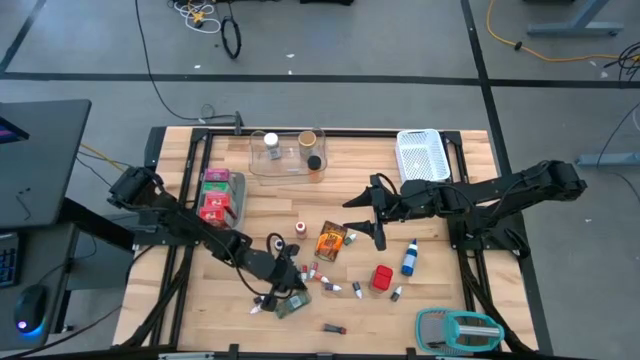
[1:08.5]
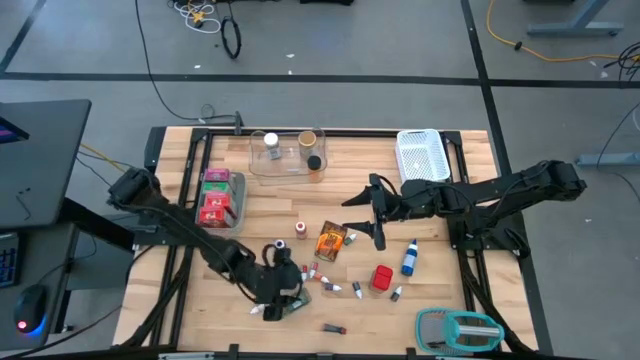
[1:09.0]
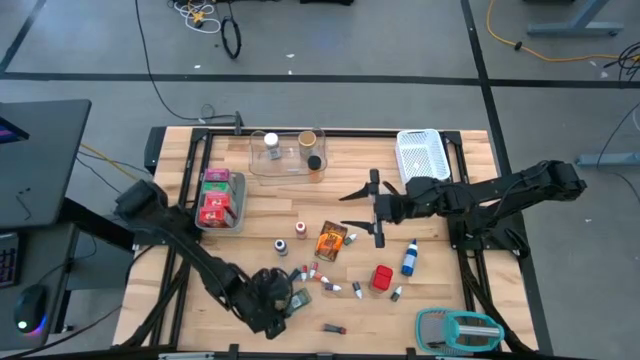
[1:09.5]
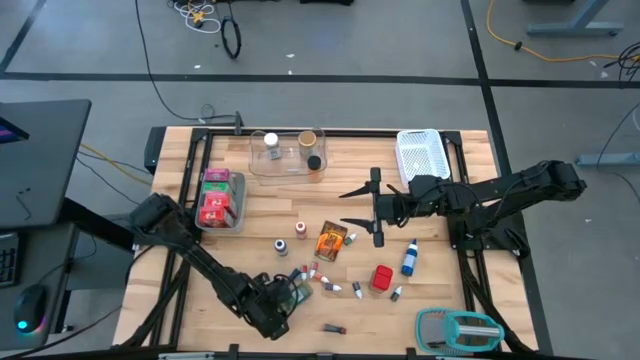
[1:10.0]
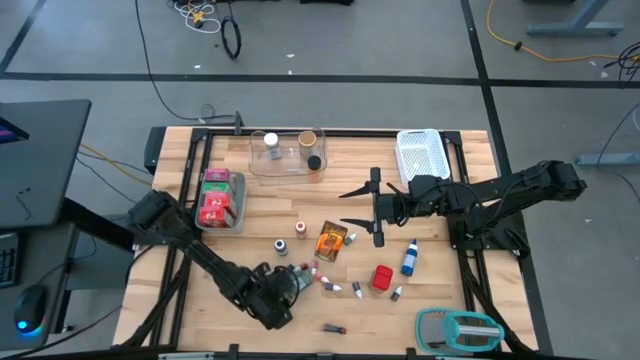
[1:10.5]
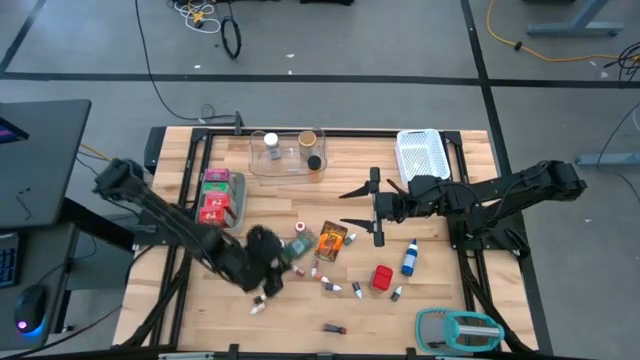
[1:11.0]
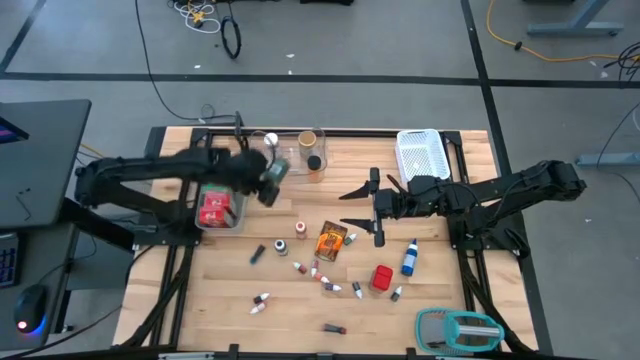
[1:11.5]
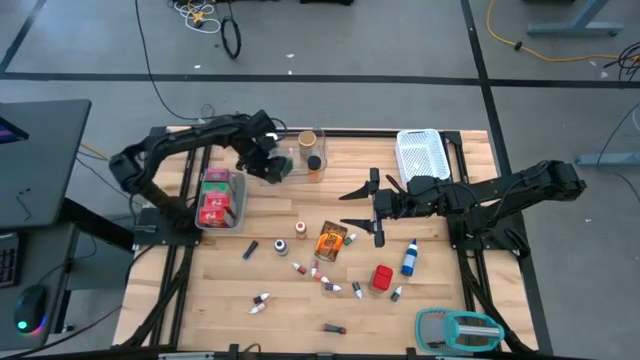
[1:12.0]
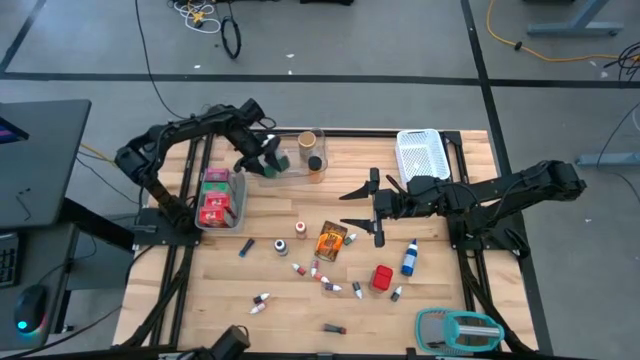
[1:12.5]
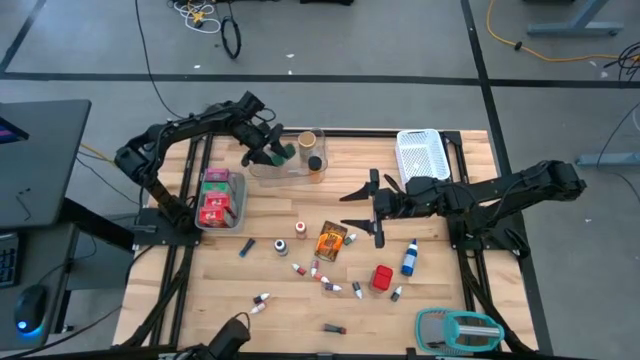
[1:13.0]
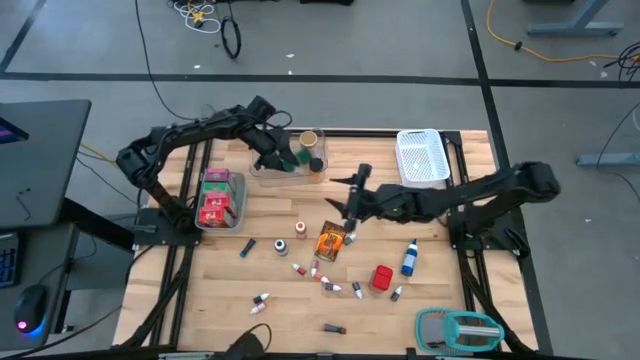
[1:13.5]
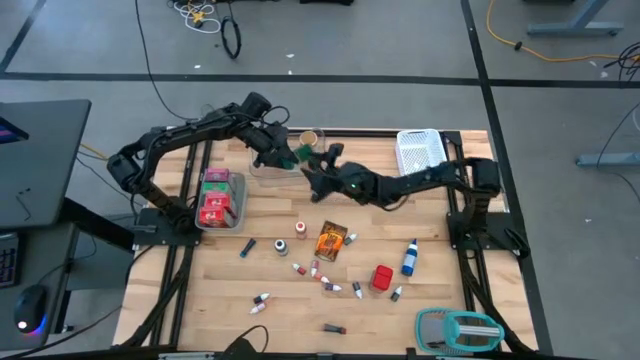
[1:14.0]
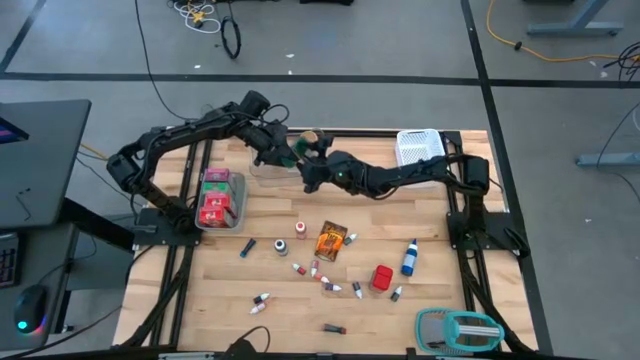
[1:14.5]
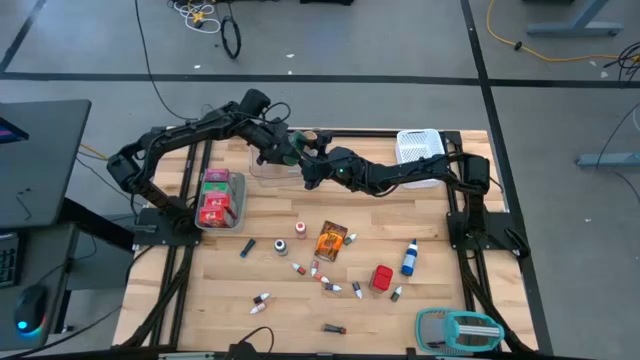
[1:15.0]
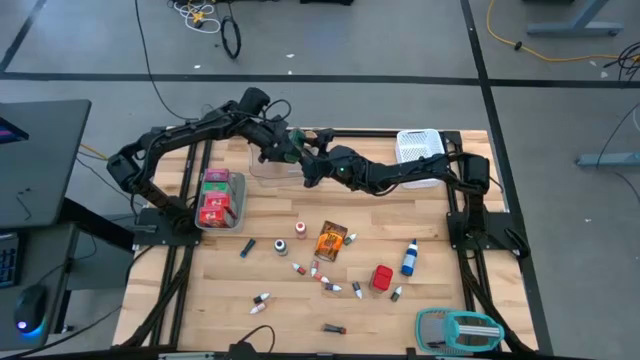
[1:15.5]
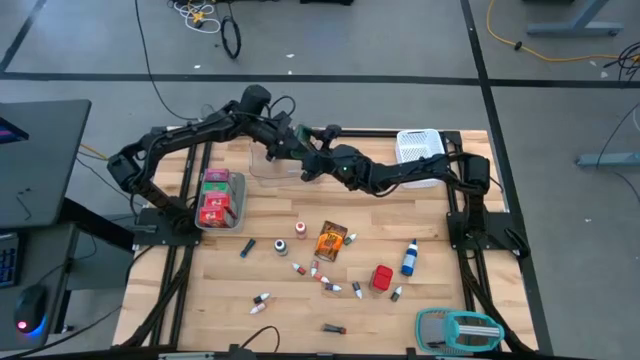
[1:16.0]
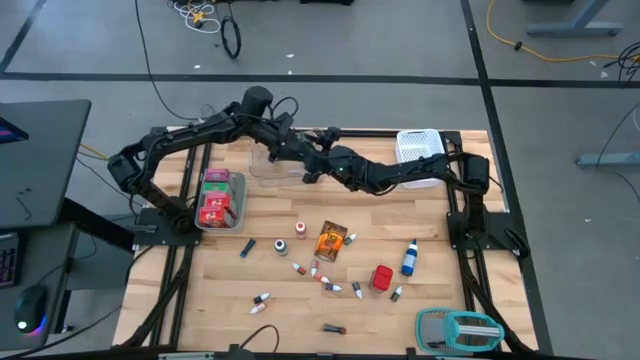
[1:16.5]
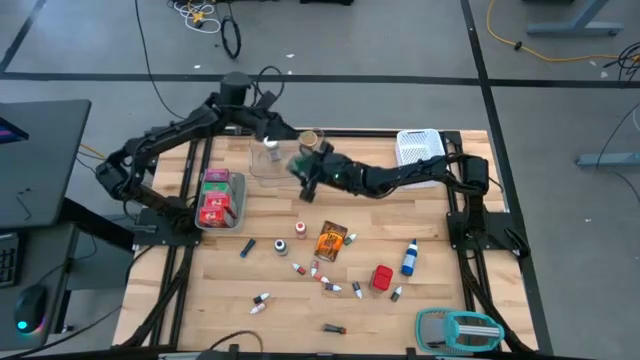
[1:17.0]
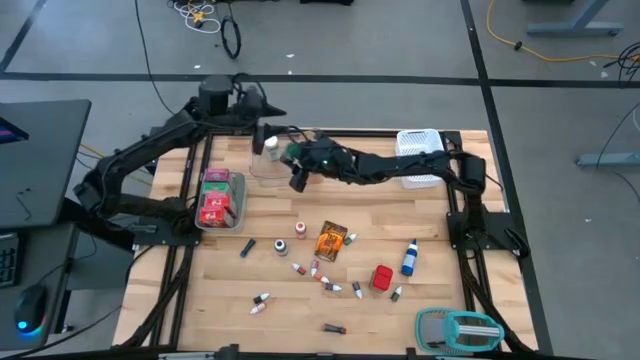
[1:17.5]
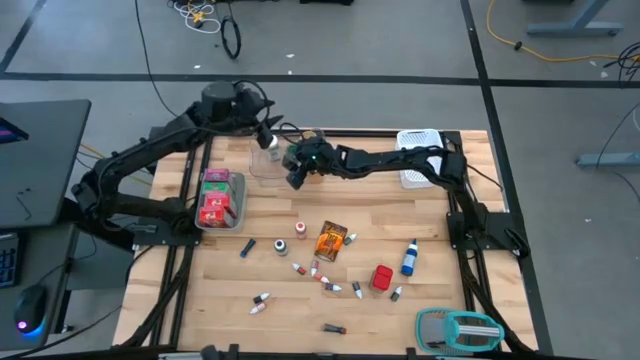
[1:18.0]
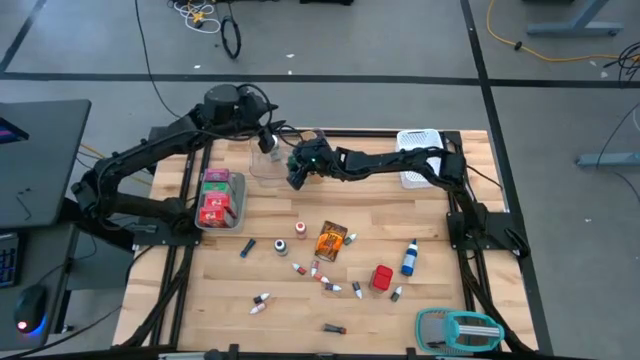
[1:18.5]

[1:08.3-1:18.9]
Task: Pick & Place Kitchen Items
Put the green seasoning bottle into the transparent bin

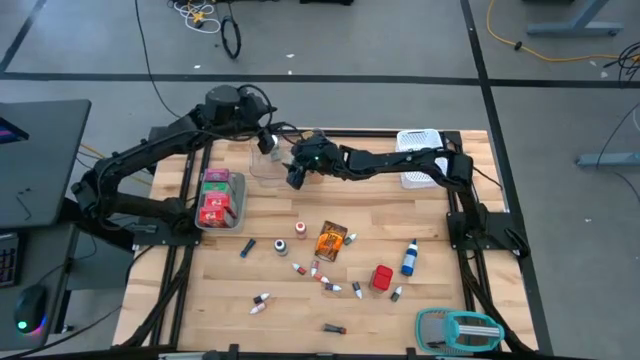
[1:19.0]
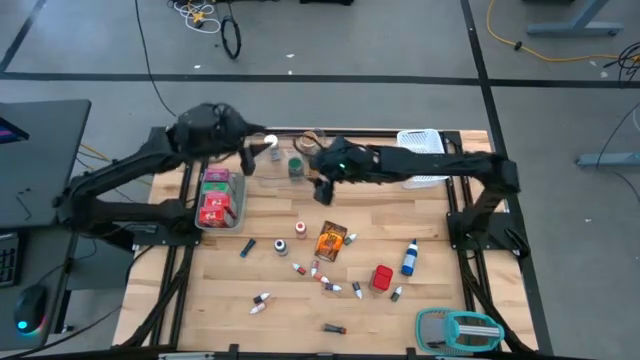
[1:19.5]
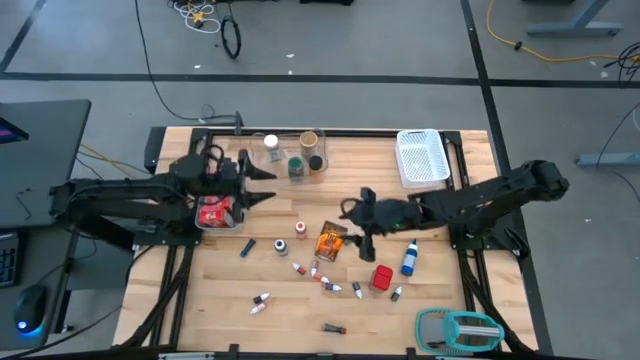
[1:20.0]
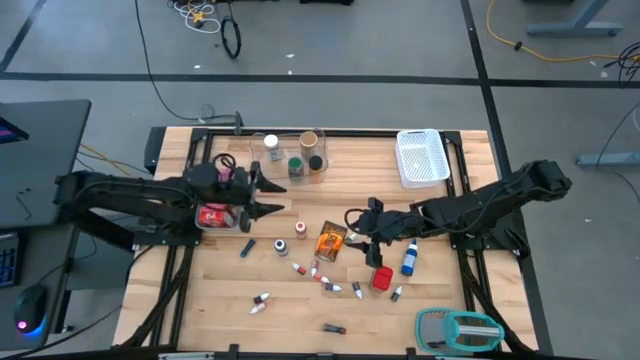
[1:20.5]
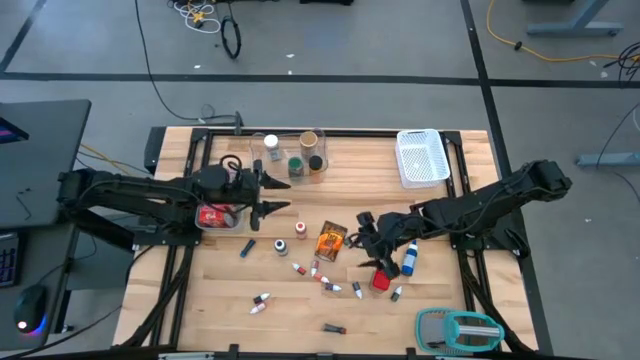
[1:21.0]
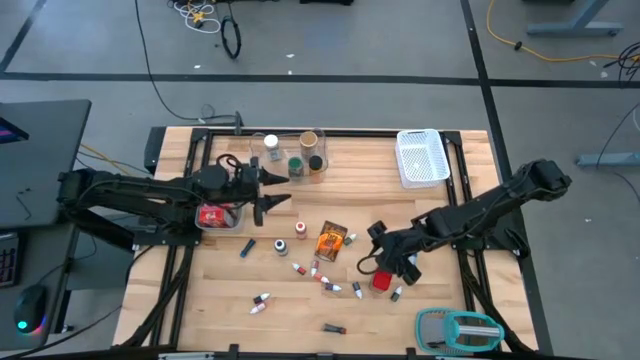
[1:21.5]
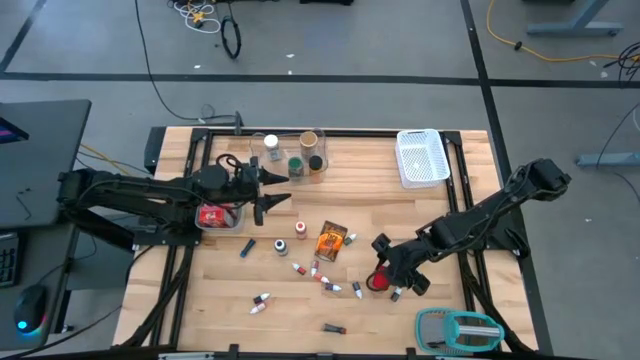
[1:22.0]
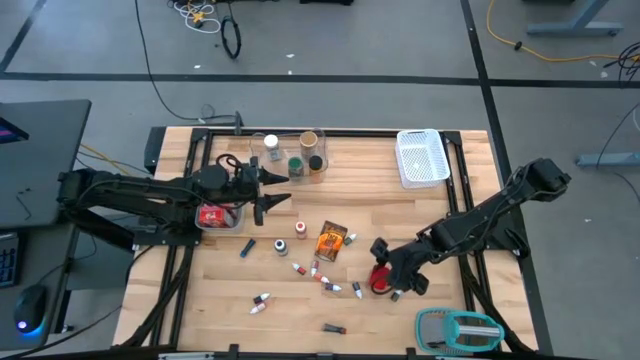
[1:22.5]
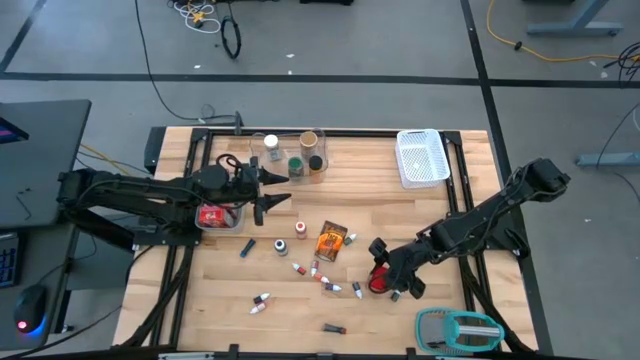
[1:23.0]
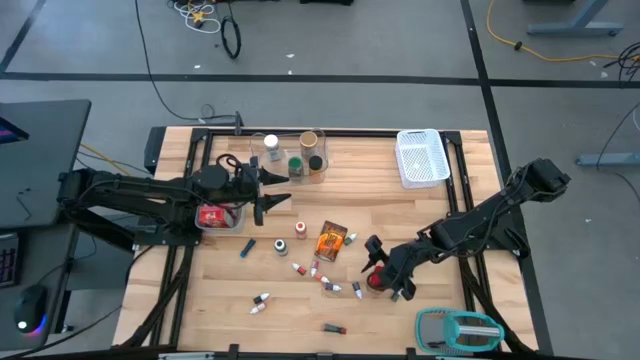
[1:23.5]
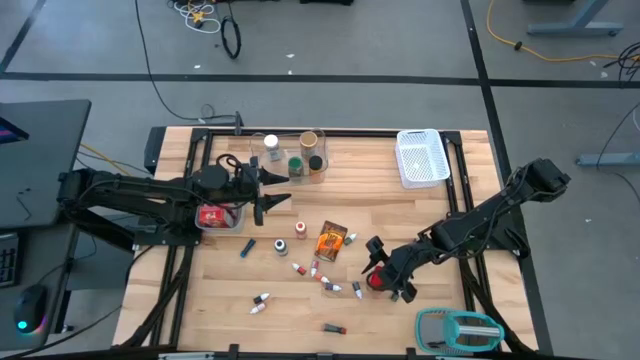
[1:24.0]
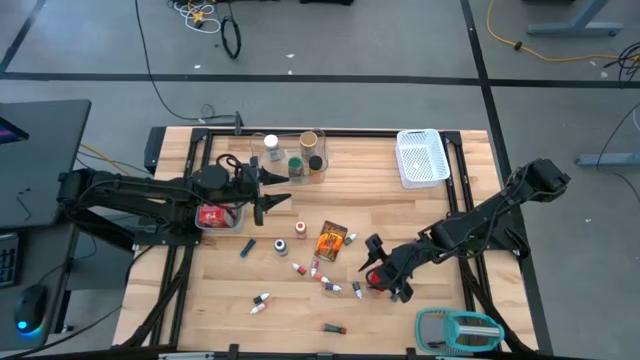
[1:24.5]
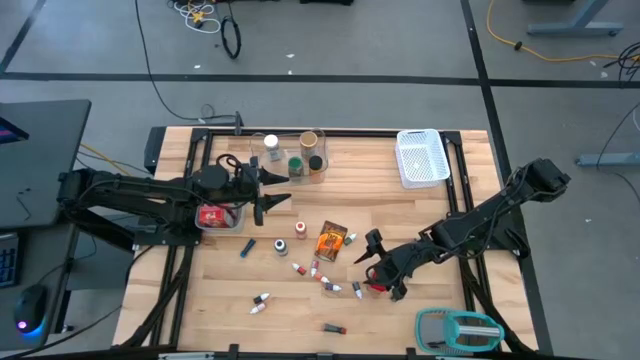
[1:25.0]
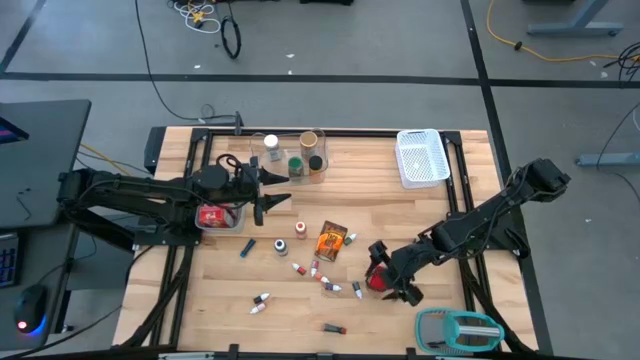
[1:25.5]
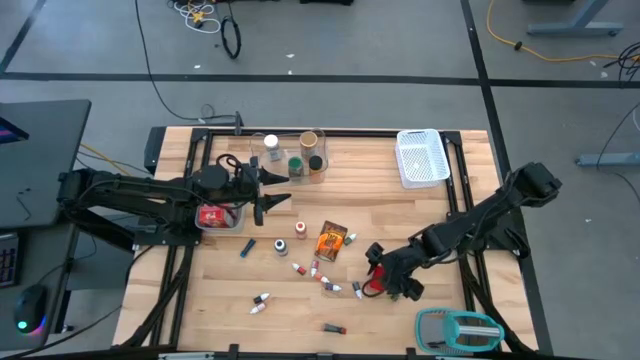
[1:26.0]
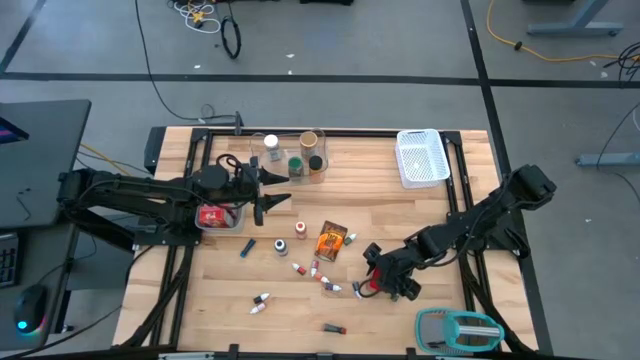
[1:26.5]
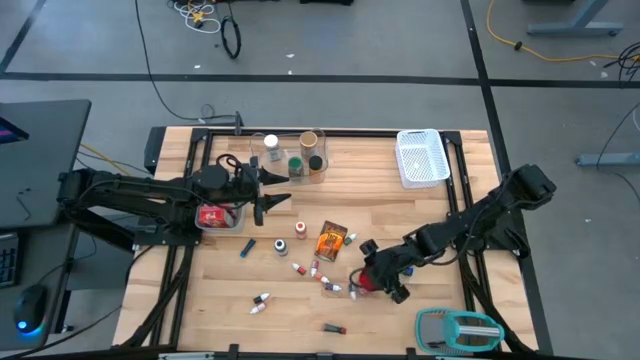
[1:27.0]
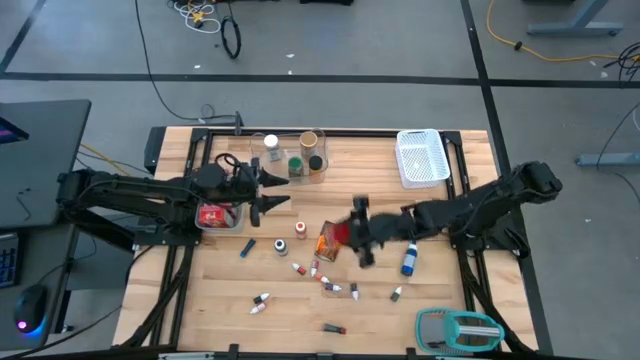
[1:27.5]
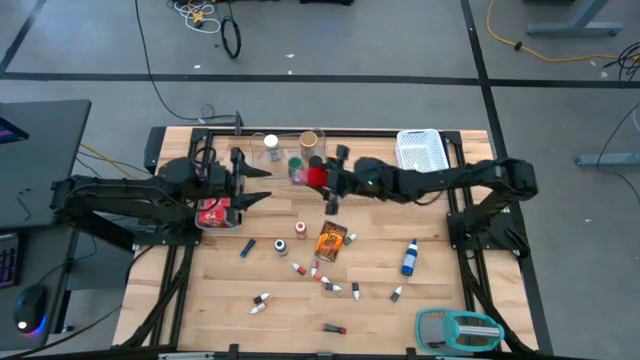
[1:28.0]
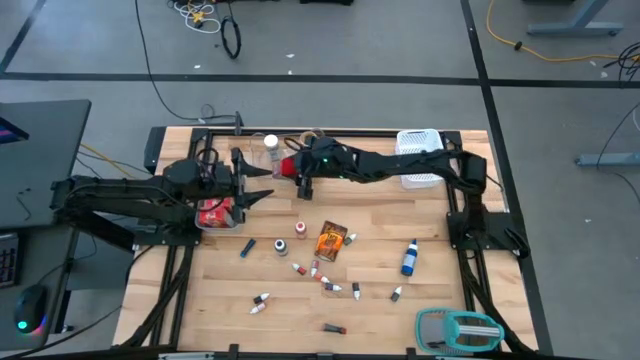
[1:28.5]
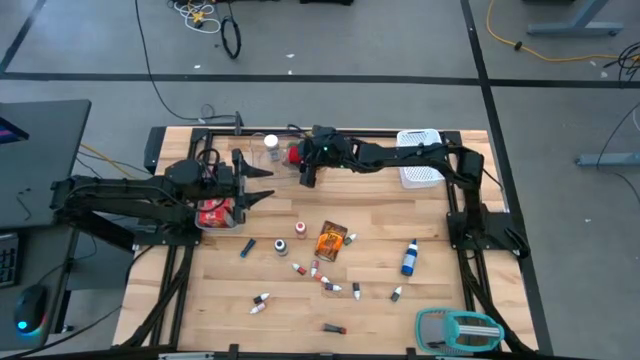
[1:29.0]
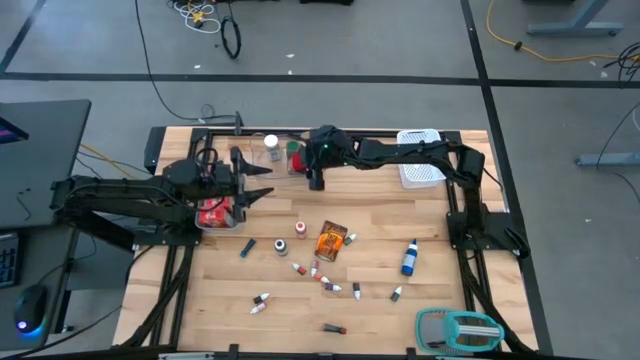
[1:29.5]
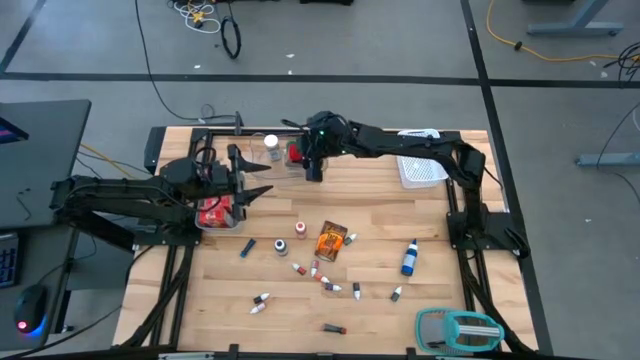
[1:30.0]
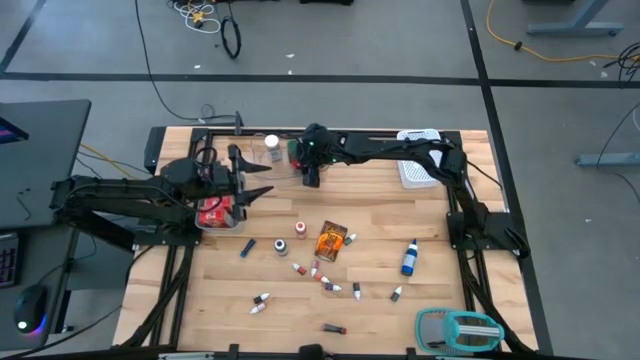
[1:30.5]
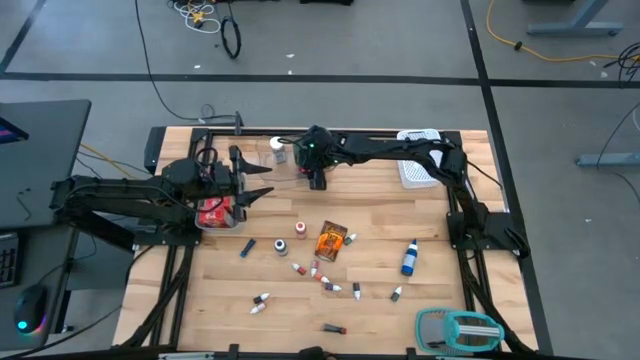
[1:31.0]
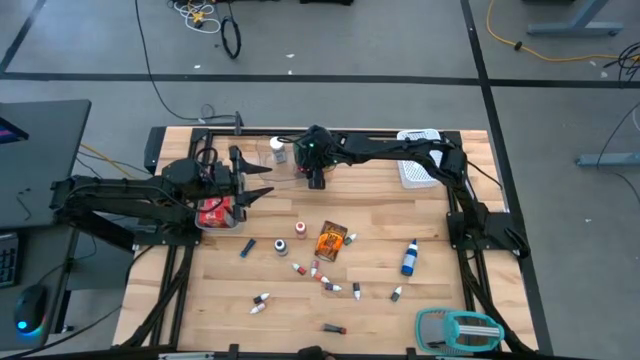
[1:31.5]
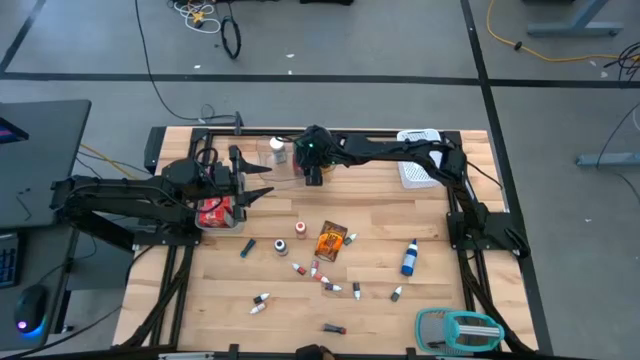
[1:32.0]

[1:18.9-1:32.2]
Put the red seasoning can into the transparent bin
